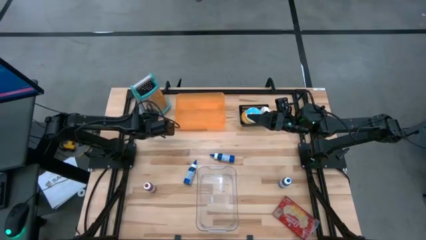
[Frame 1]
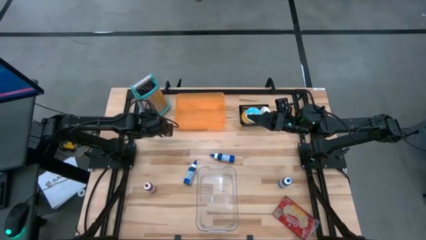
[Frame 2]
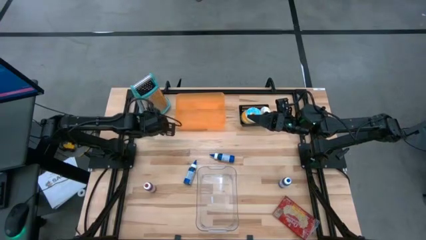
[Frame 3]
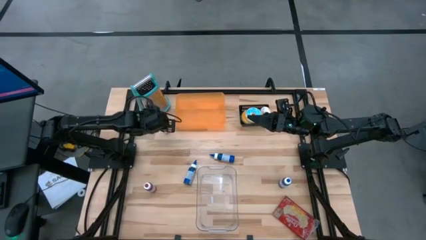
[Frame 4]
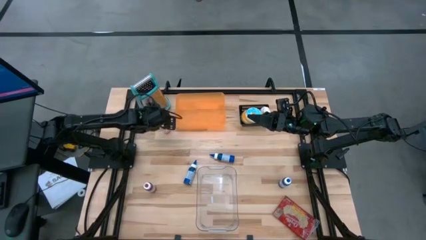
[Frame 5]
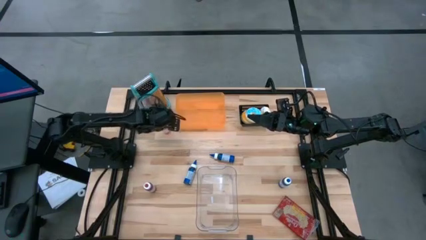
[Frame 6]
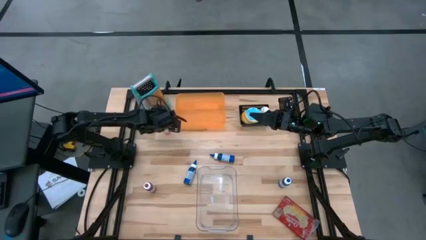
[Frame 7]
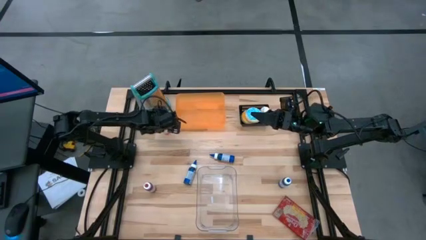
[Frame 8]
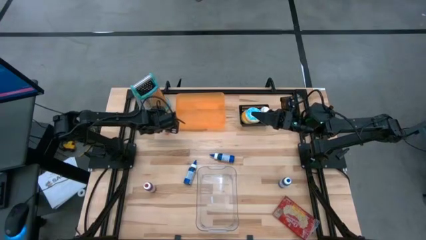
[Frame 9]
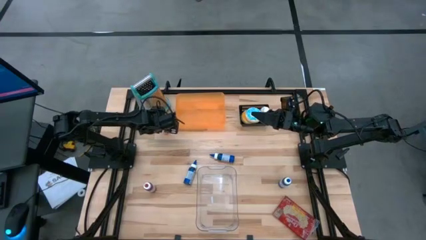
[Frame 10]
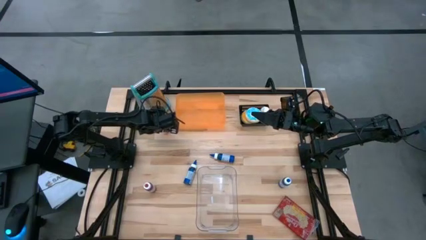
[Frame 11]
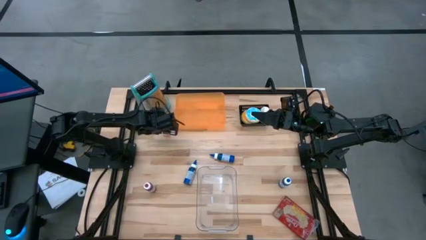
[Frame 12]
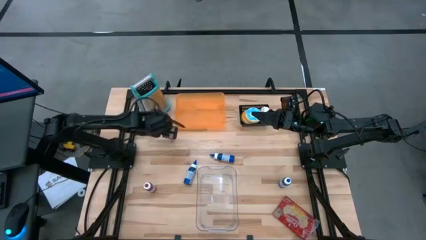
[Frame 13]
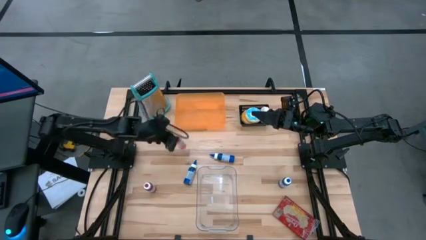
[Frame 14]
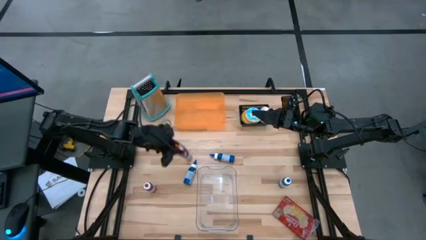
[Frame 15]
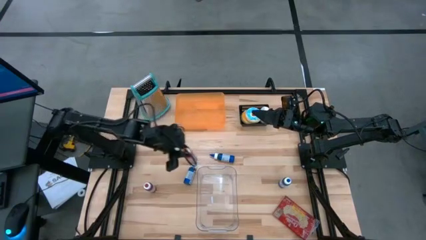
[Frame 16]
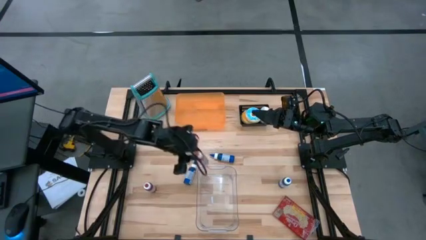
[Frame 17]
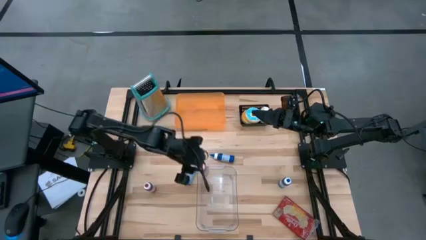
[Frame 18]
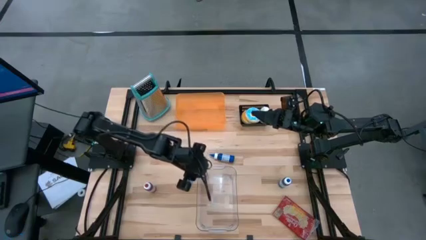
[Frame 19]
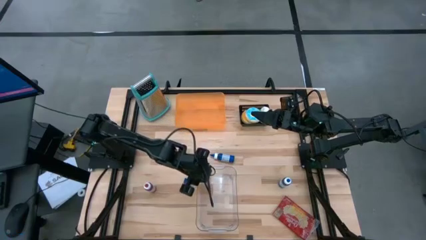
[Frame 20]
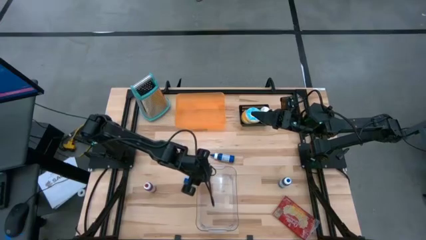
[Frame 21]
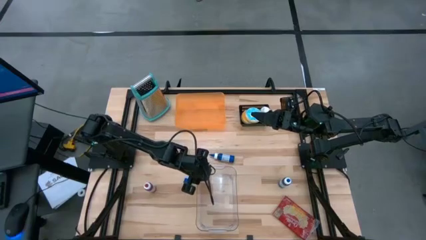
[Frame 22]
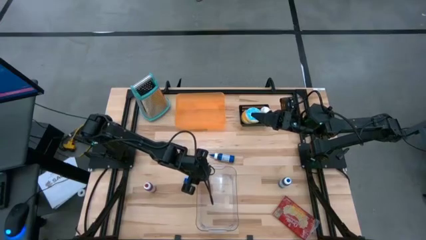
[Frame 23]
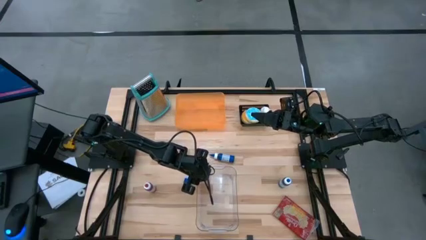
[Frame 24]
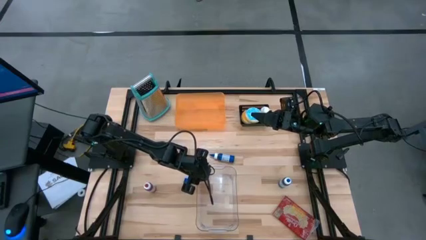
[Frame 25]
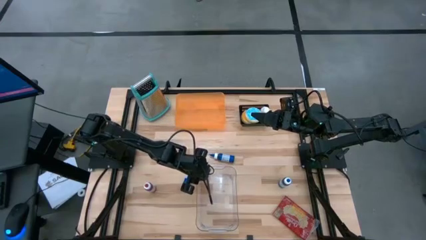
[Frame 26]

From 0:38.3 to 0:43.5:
Put the orange food coloring bottle into the transparent bin

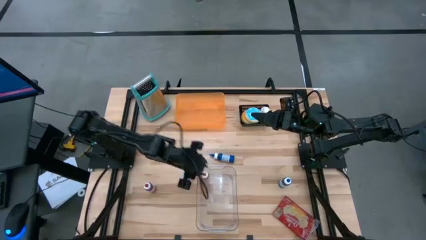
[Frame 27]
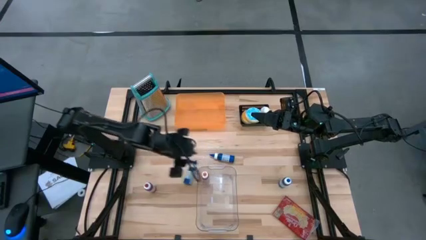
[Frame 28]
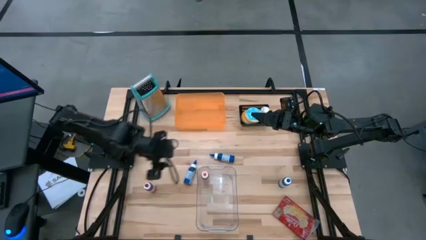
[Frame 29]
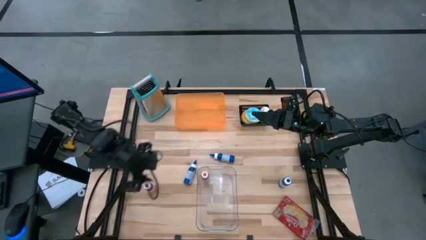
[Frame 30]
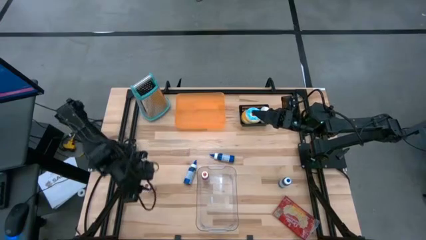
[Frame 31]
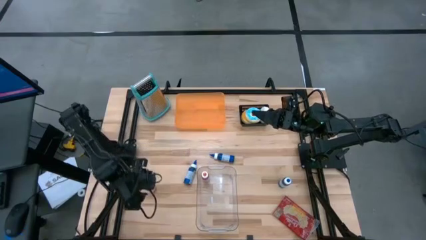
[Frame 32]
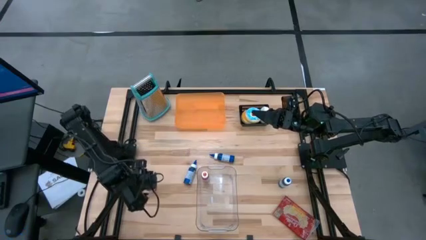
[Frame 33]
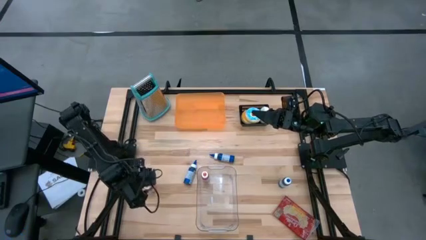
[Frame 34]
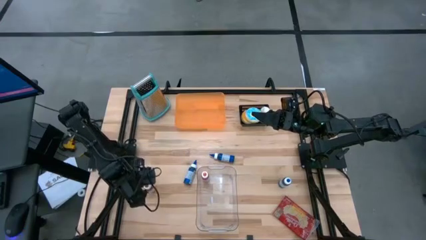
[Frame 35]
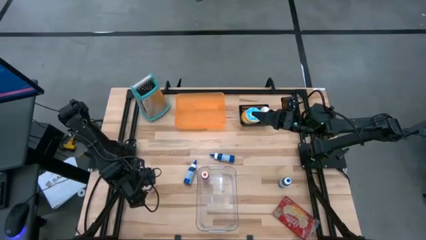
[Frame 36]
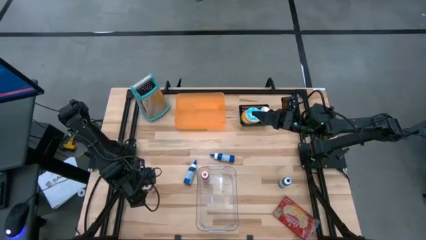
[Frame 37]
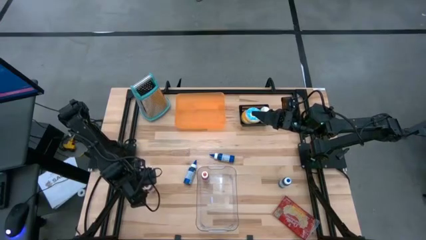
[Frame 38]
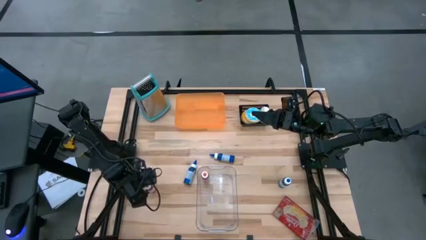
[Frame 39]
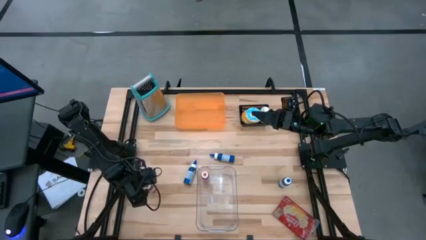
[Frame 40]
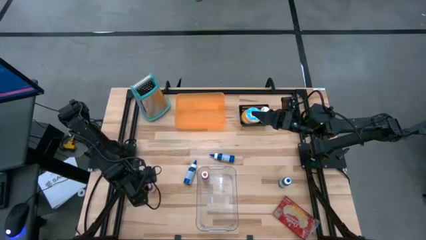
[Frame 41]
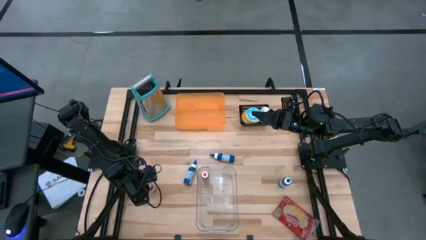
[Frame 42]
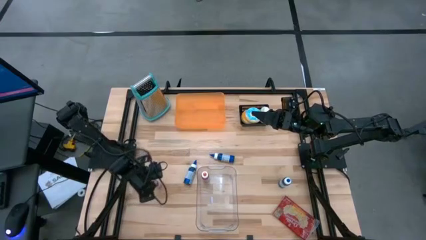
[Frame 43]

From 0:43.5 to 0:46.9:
Put the red food coloring bottle into the transparent bin

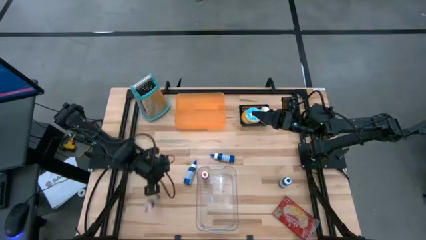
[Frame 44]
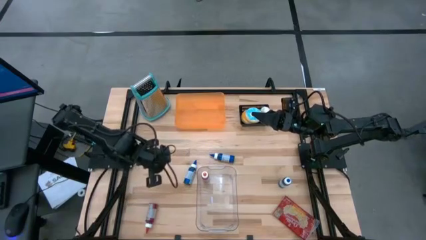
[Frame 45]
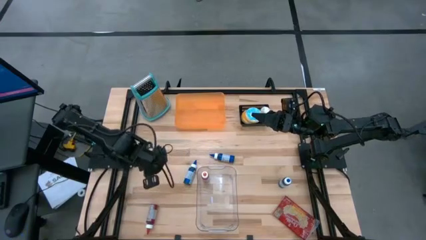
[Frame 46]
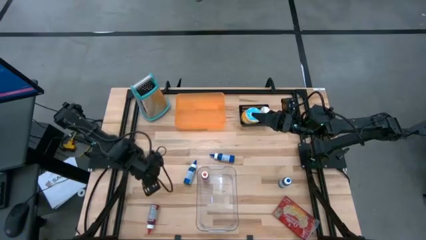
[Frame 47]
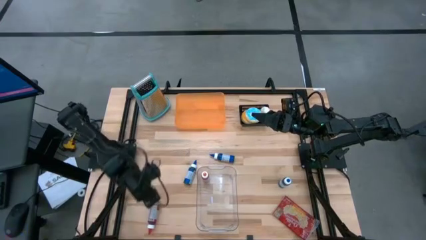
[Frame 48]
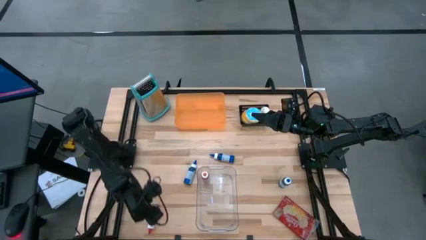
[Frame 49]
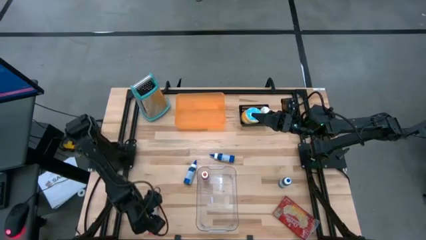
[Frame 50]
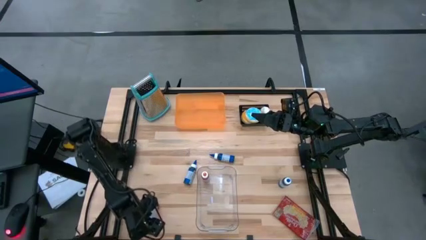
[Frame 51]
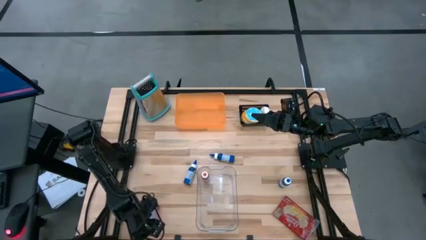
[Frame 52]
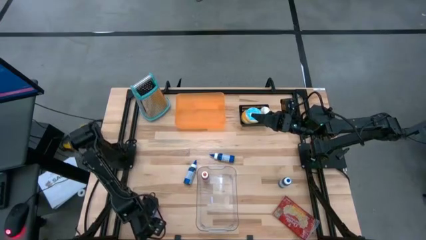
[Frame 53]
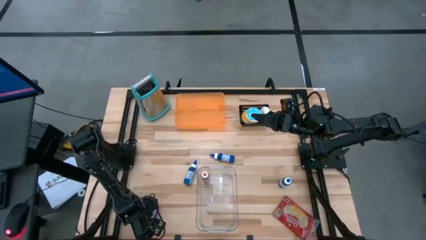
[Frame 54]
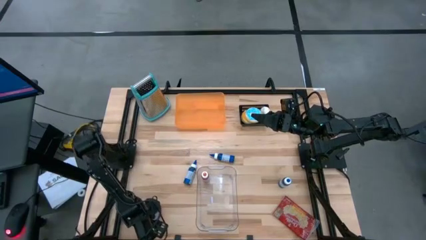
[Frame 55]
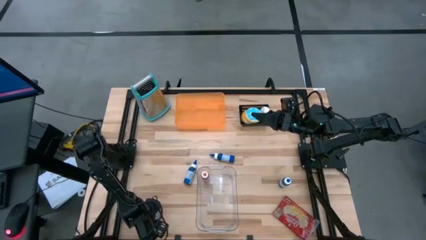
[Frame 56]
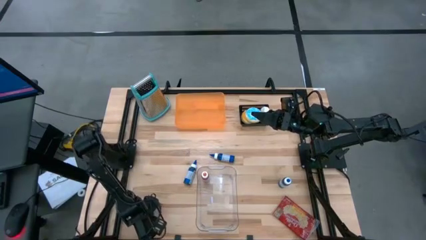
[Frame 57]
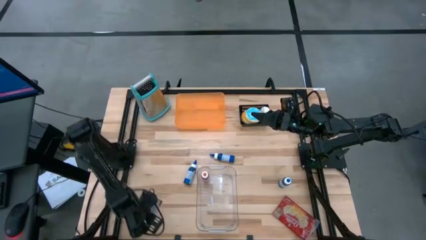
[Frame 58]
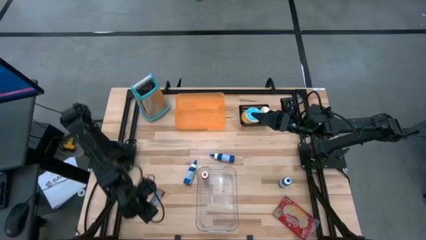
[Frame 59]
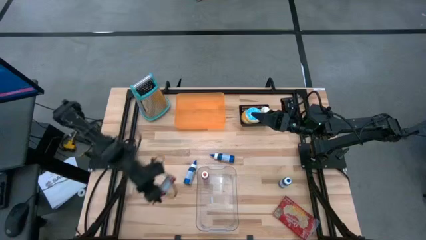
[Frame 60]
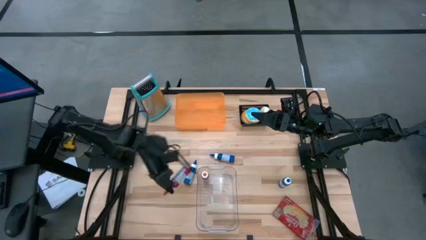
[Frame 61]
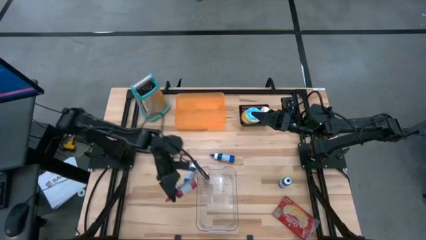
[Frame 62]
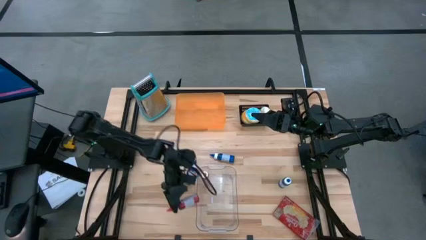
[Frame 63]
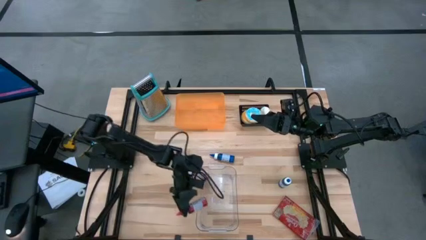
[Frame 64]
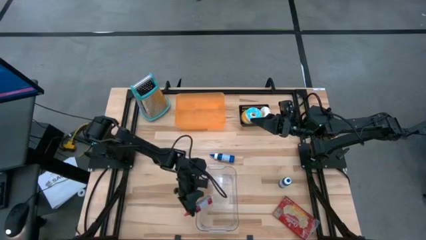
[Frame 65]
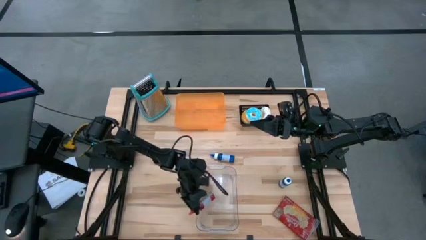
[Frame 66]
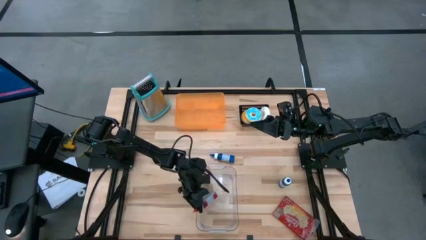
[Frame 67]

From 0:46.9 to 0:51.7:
Put the red food coloring bottle into the transparent bin

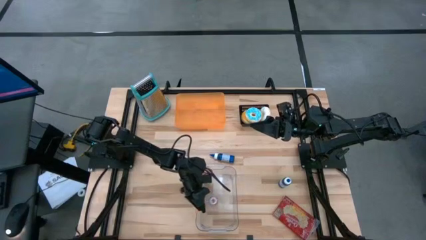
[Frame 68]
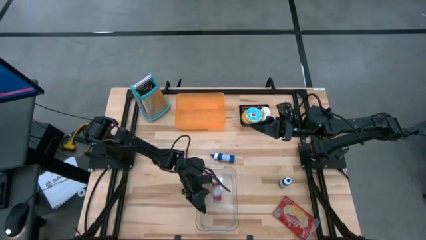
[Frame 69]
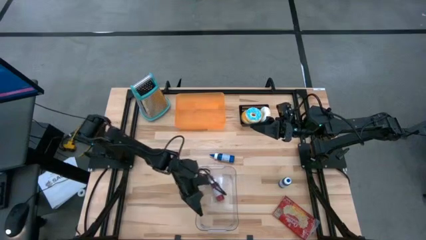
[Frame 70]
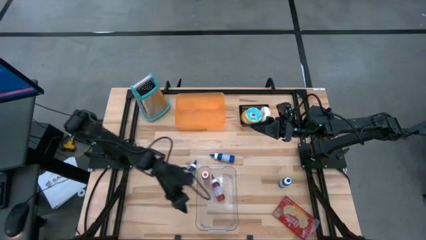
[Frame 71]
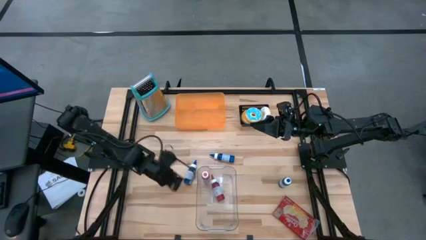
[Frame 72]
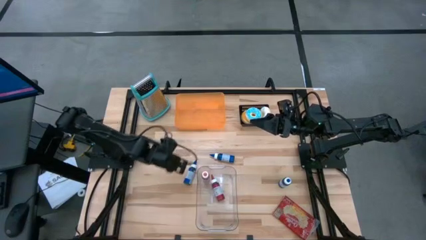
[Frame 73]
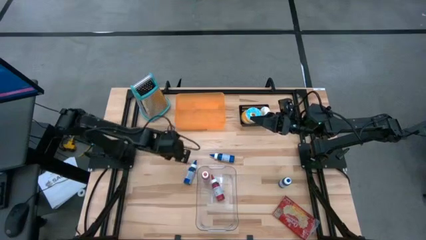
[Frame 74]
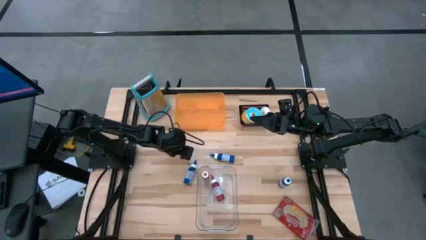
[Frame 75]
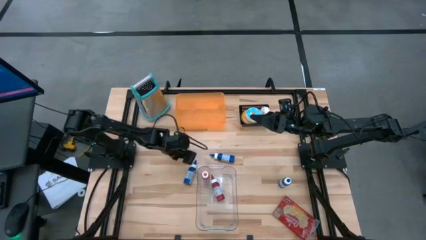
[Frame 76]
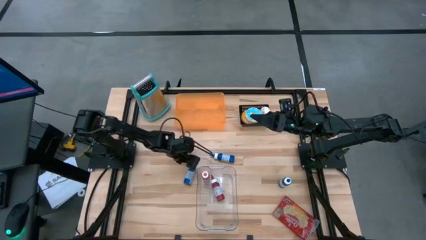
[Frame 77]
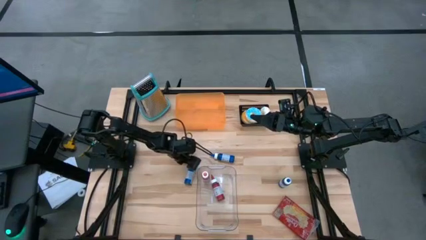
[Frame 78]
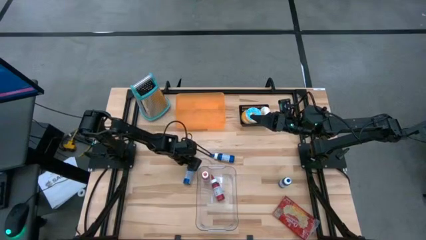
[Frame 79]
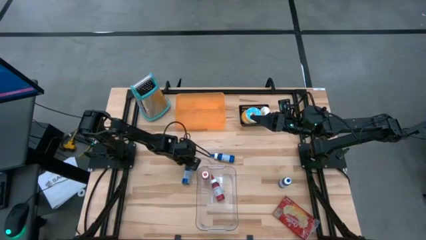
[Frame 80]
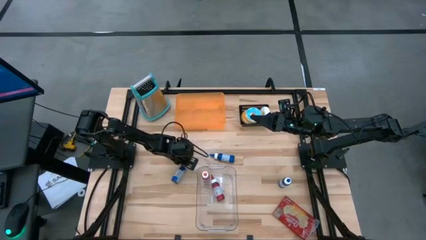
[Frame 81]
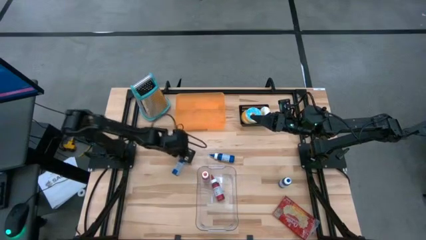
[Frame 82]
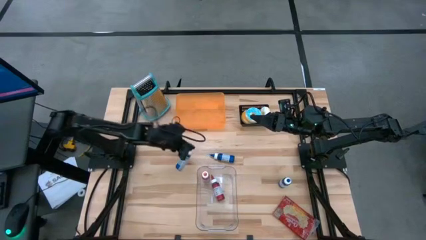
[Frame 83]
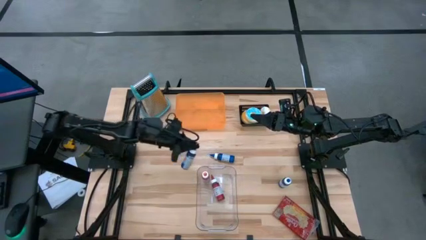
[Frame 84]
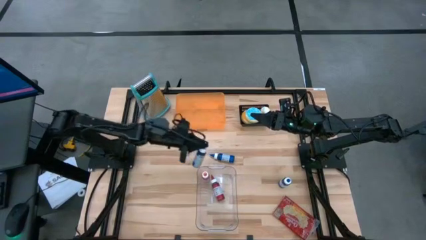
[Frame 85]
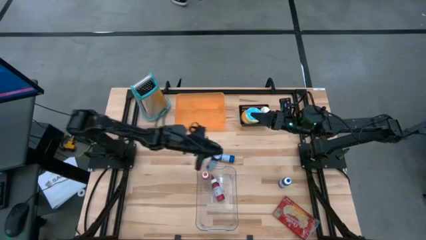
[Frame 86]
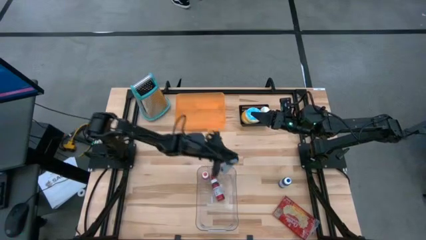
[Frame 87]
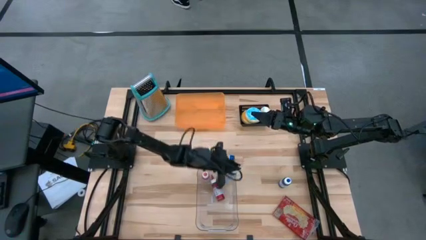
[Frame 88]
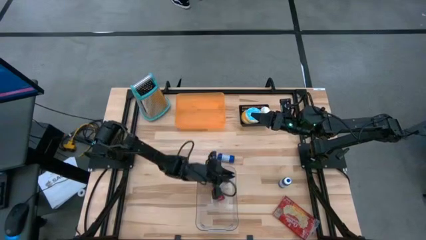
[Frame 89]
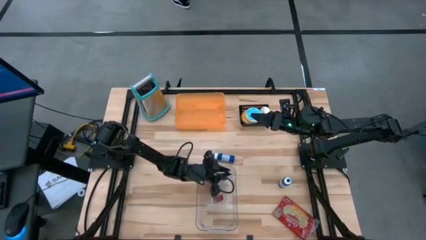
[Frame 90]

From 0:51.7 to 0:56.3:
Put the left blue food coloring bottle into the transparent bin
